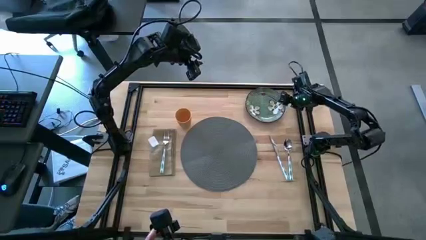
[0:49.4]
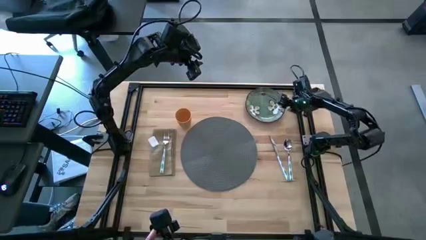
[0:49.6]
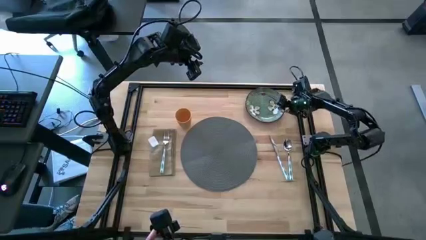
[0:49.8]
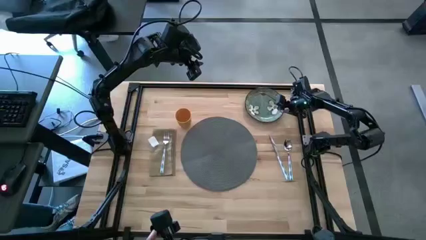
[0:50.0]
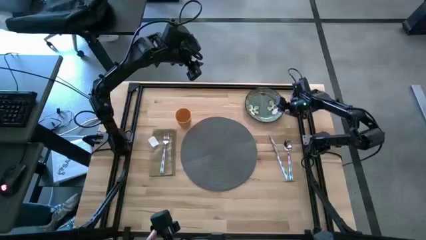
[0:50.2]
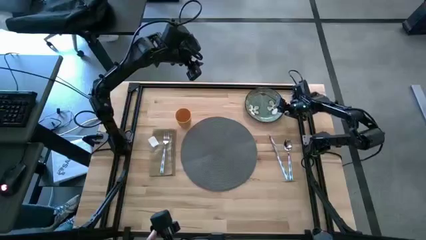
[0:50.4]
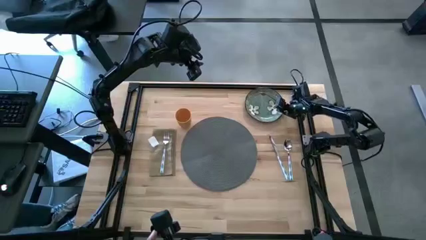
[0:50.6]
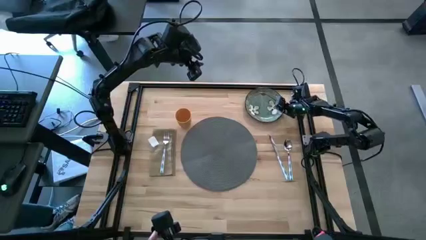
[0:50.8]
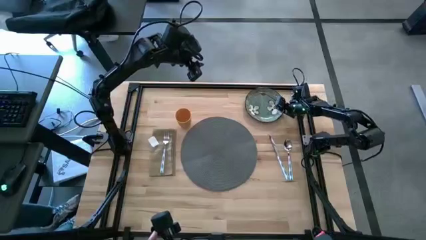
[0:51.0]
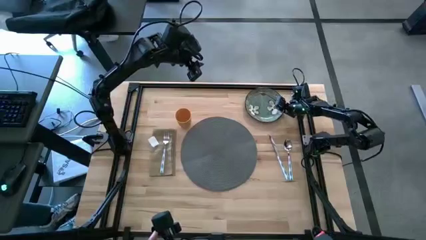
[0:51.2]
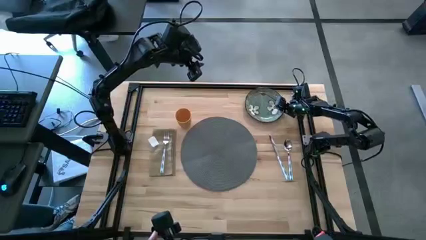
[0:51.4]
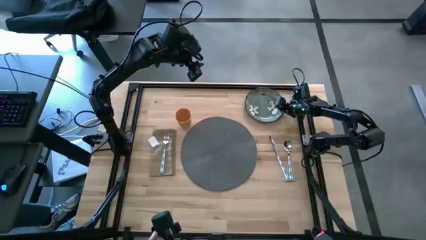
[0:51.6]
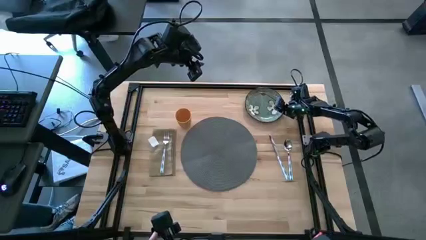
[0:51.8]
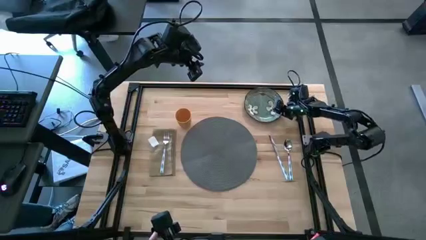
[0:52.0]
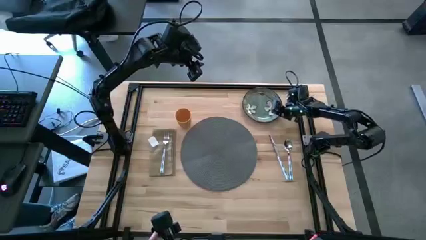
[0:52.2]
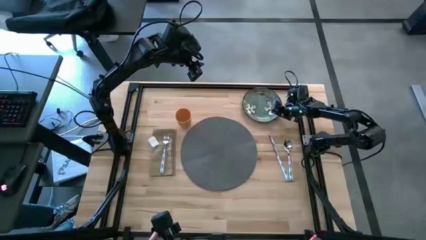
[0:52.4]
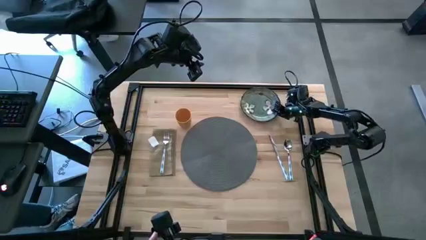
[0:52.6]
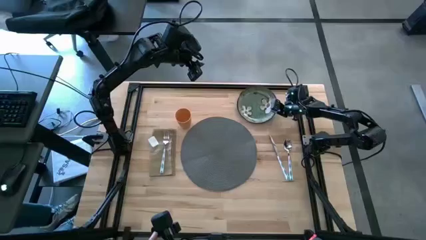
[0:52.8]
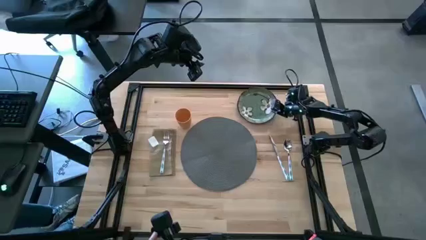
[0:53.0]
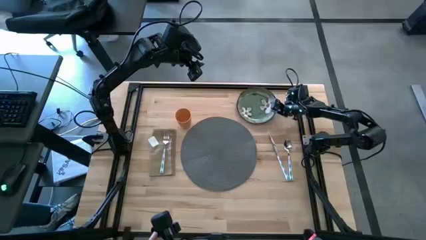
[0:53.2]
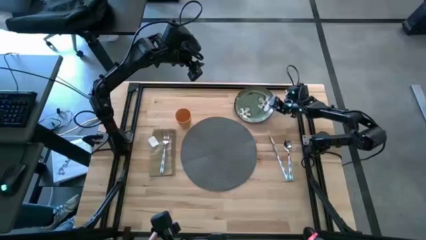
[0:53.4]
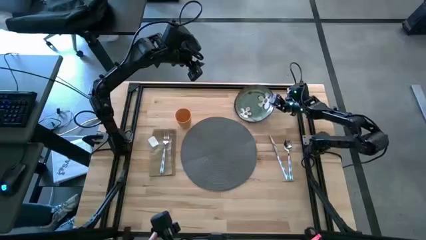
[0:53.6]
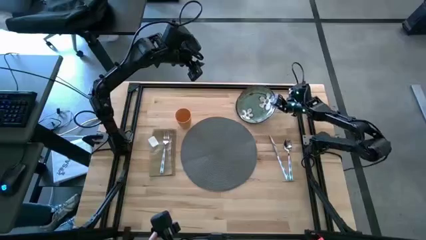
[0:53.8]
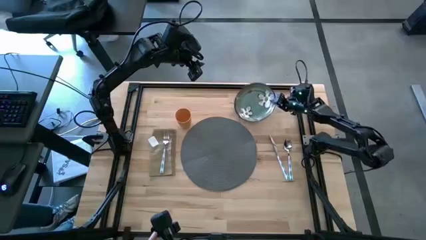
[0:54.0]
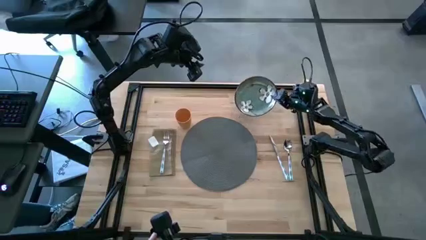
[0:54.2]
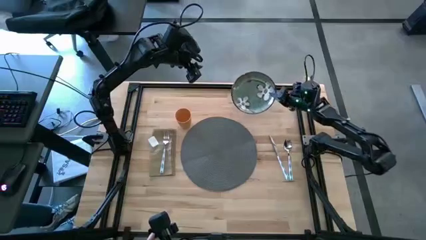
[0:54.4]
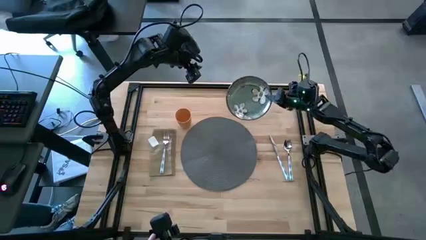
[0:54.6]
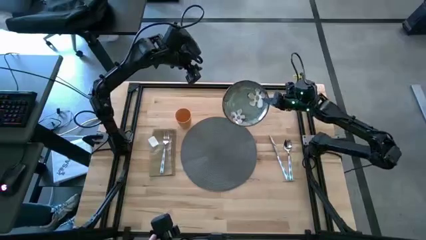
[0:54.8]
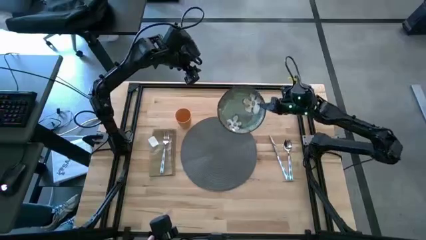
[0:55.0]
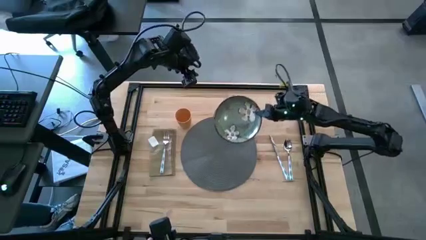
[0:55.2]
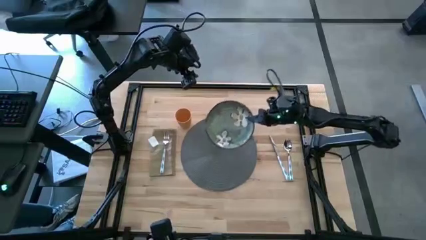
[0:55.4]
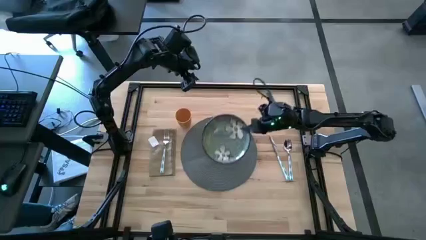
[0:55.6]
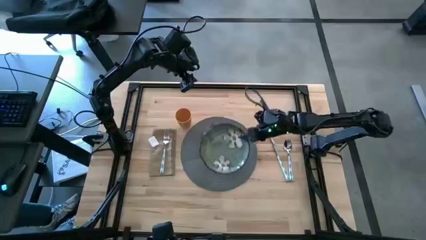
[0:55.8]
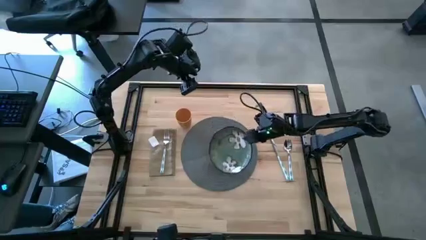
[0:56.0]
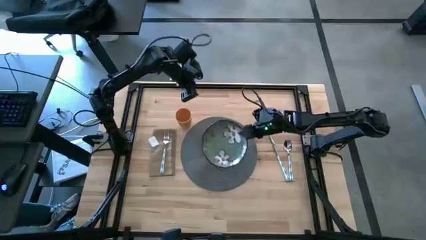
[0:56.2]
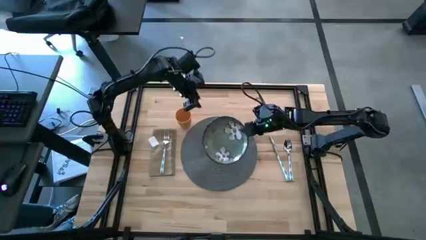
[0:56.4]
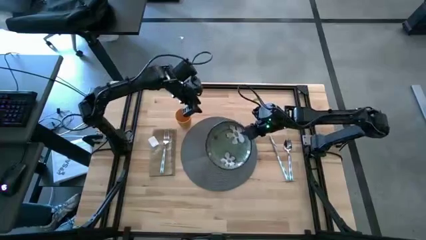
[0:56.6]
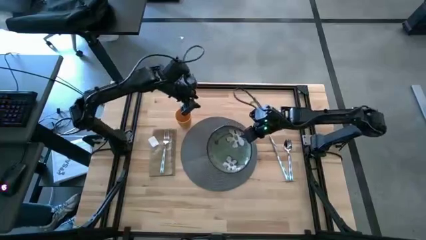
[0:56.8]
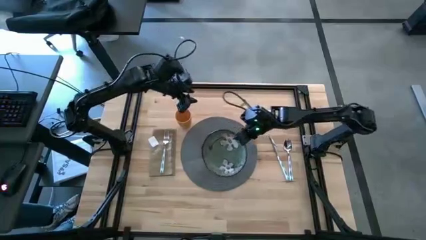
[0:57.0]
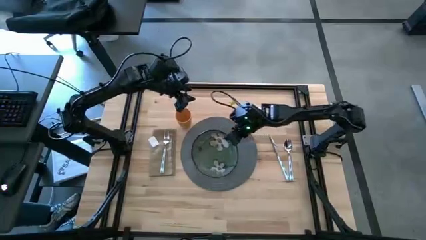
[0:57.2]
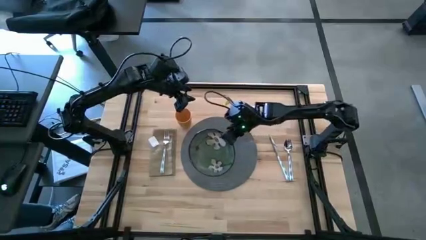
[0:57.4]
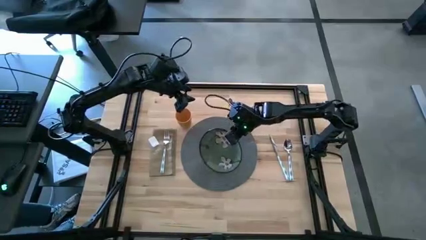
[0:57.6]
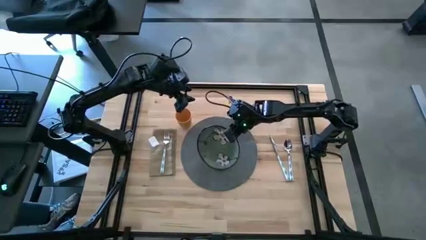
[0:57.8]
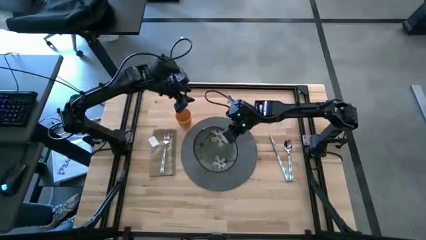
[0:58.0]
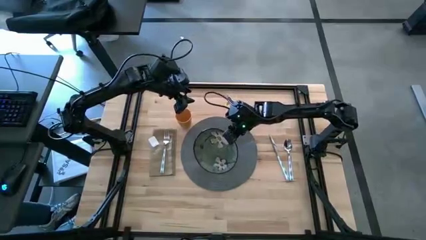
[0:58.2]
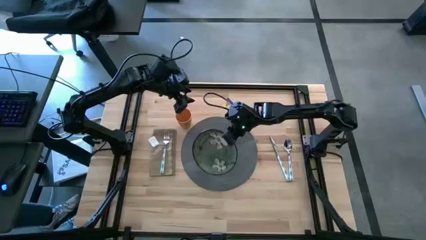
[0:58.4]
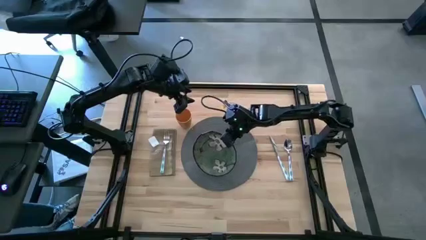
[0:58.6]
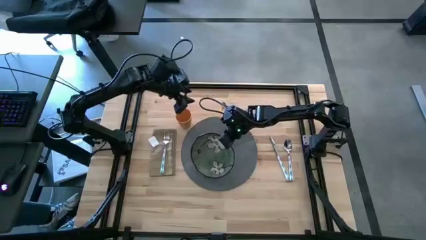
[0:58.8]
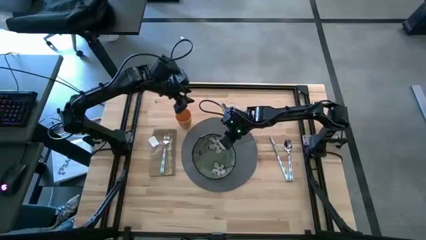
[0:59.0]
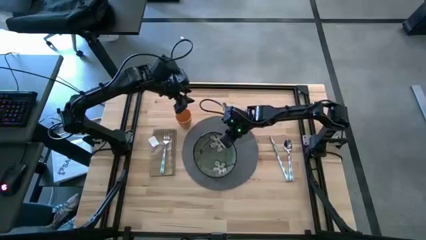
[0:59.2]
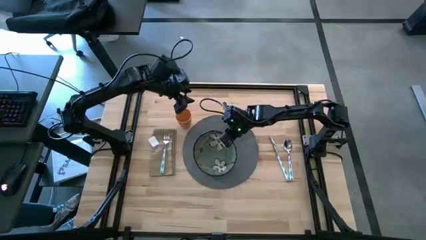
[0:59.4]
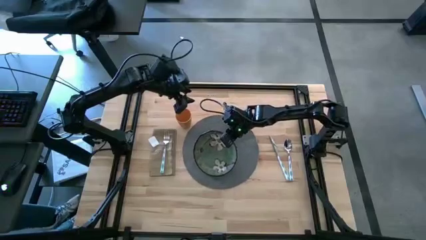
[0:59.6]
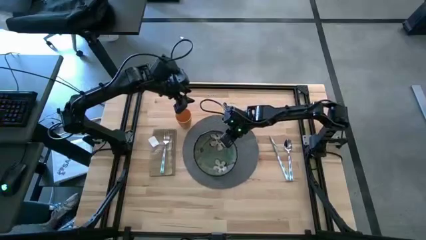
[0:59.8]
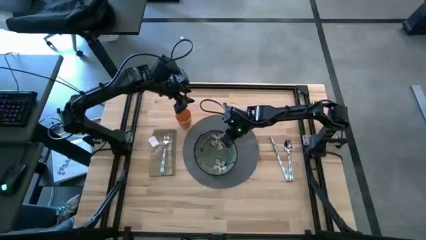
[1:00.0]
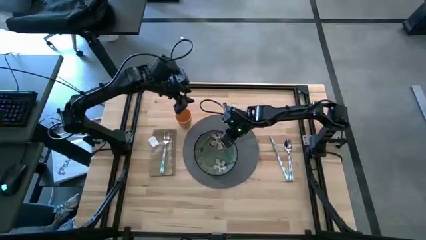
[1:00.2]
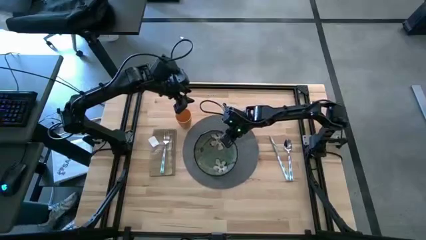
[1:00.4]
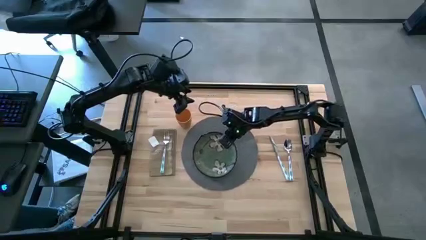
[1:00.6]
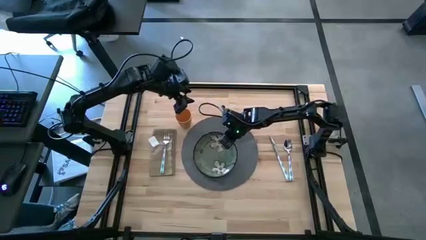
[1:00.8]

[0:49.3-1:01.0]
Task: Set table place
Put the green plate on the gray table mat

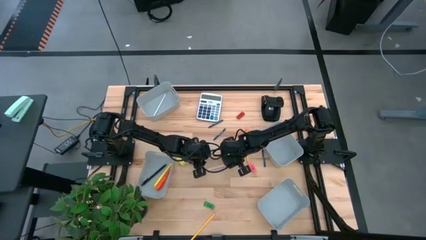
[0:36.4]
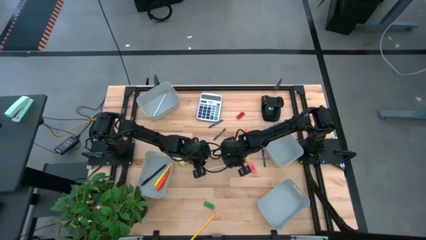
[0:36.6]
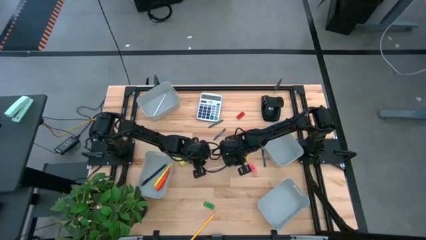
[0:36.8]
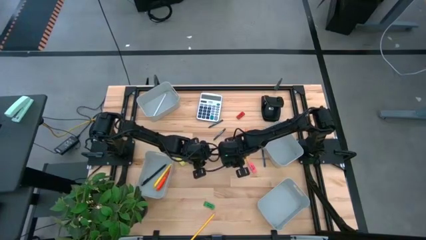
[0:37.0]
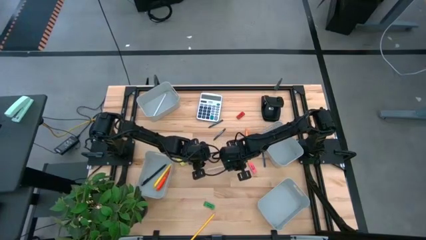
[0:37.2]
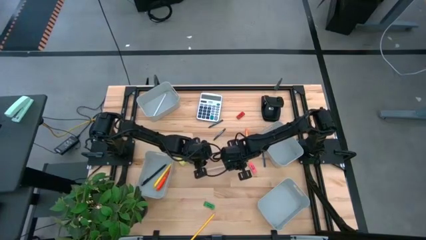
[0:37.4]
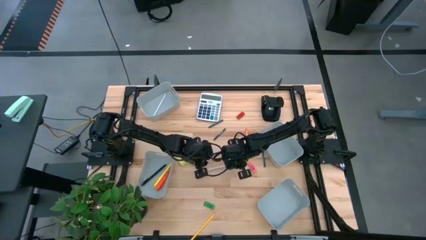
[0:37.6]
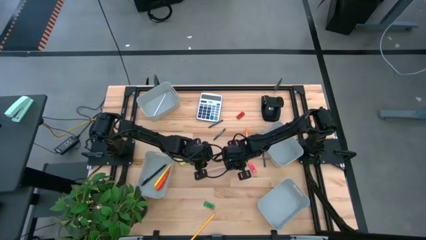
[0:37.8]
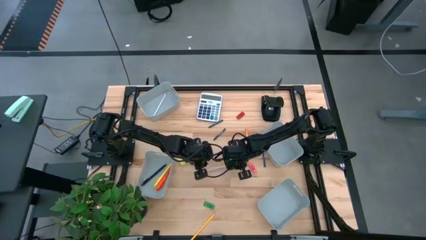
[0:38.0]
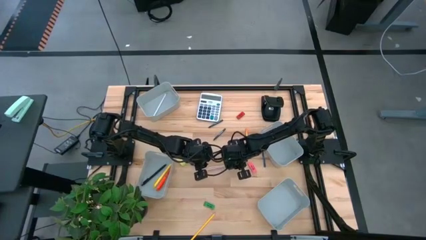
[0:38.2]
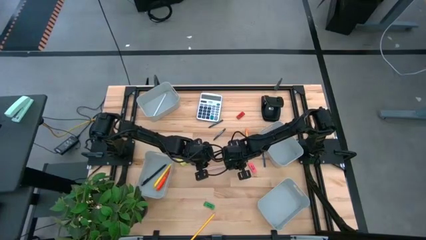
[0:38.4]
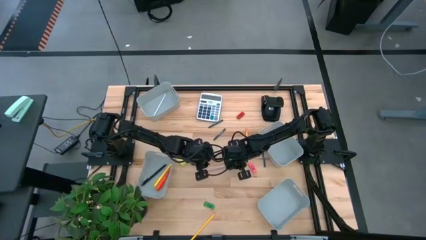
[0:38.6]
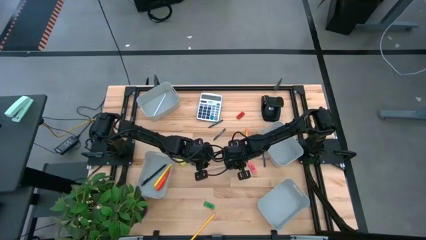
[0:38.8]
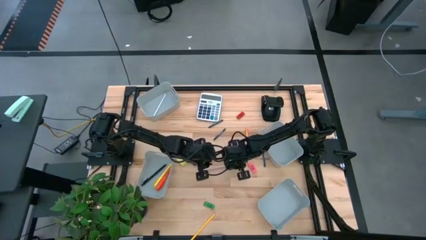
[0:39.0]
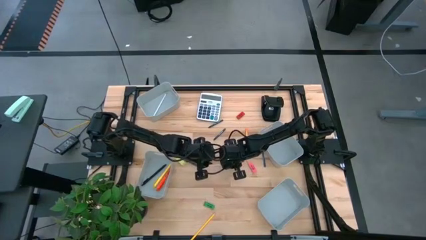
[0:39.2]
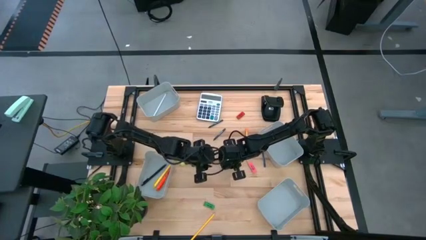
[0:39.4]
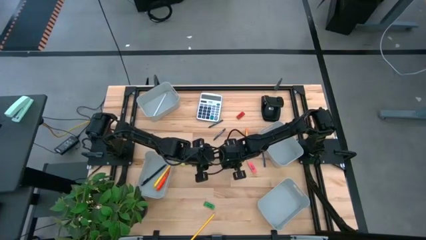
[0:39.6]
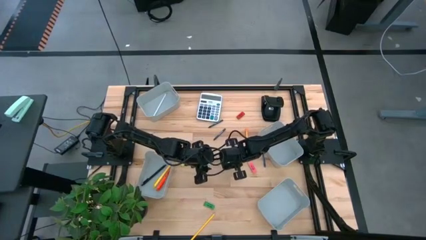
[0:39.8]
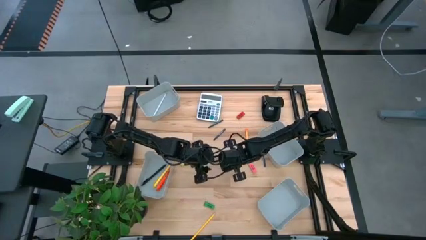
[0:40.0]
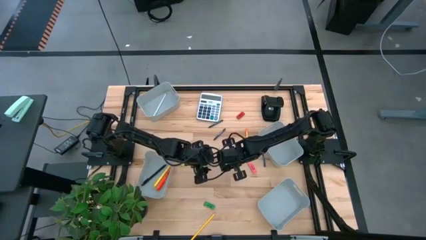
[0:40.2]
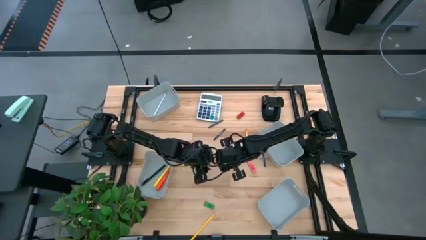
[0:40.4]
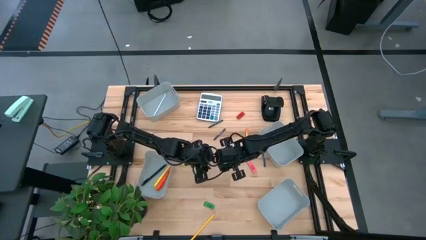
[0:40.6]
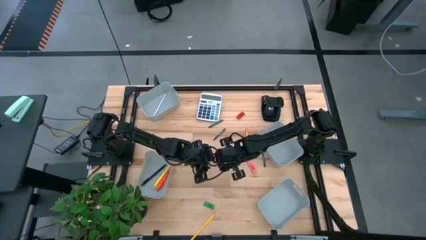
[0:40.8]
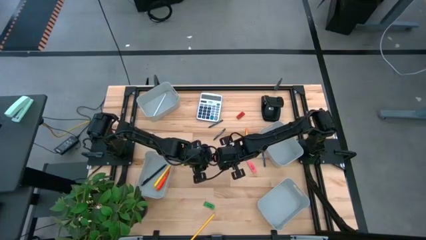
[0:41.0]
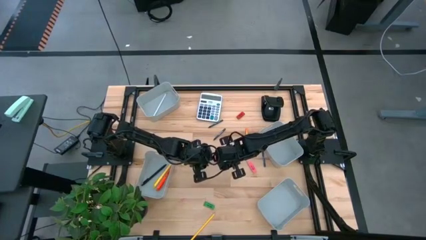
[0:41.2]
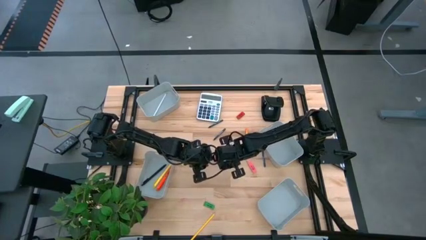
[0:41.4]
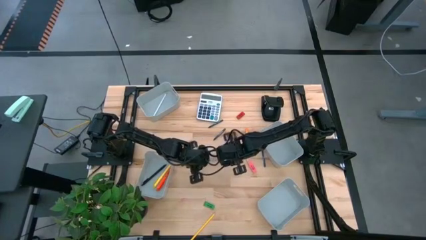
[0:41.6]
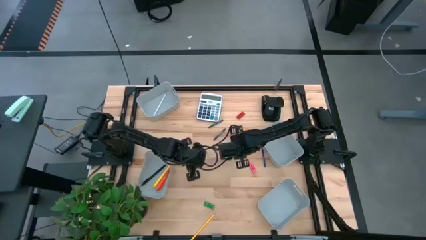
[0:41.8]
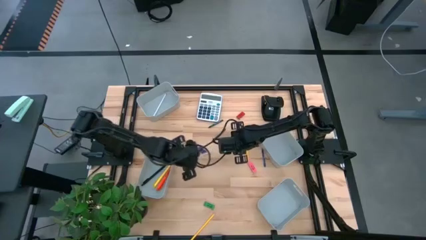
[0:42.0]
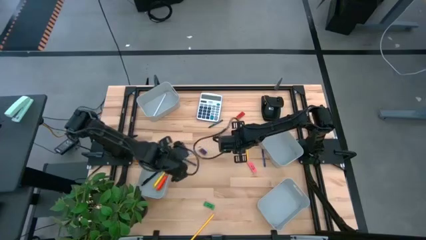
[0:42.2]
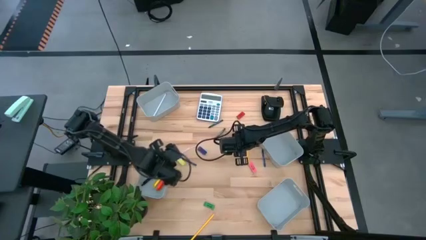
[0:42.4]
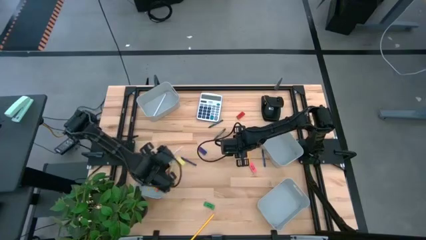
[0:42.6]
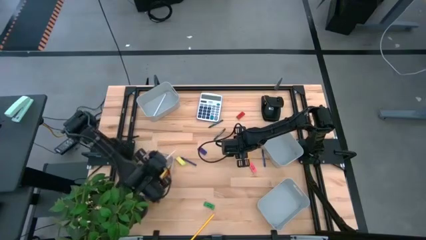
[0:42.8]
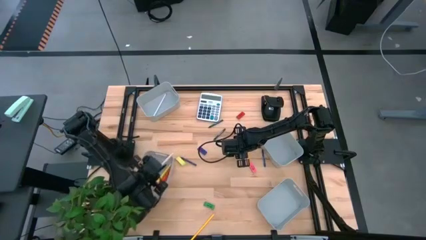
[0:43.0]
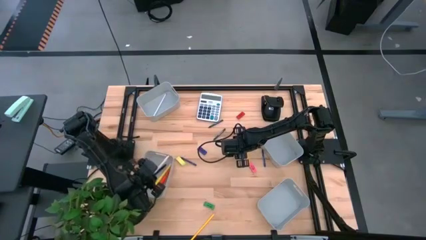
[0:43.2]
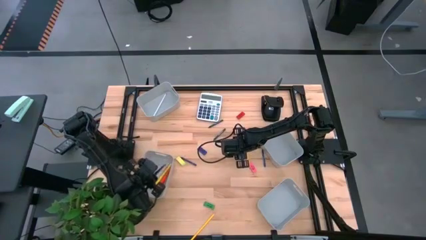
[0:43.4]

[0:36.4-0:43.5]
Task: Sort crayons/erasers/pens/pencils in bins
Put the light pink ballpen into the bottom left gray bin
